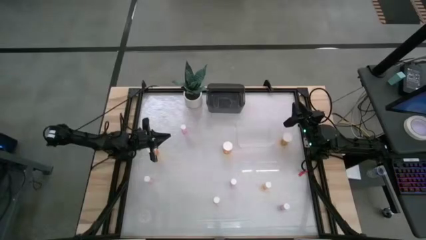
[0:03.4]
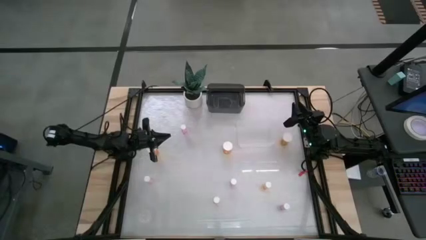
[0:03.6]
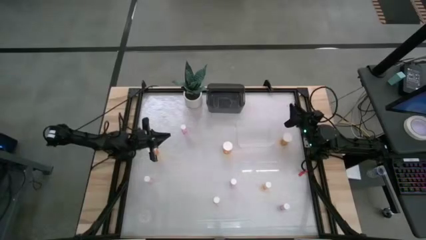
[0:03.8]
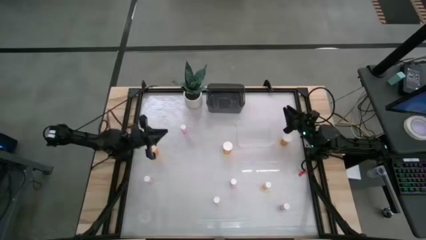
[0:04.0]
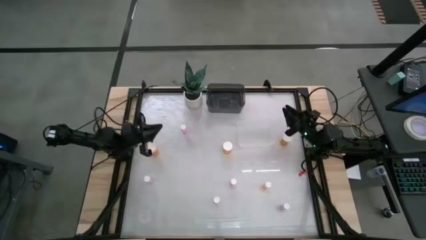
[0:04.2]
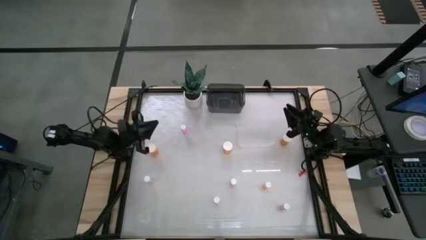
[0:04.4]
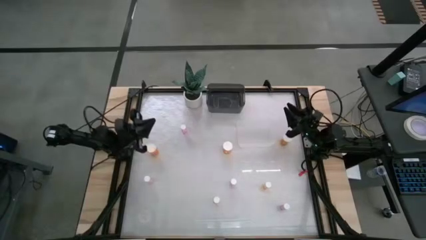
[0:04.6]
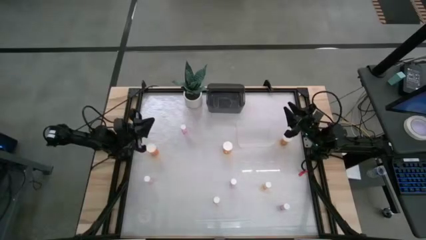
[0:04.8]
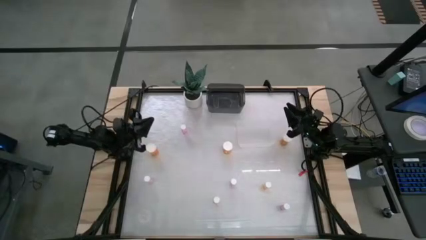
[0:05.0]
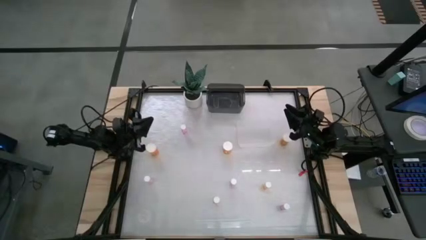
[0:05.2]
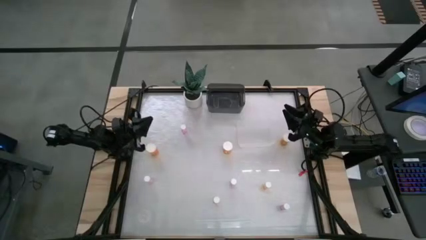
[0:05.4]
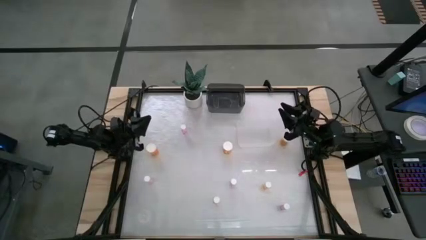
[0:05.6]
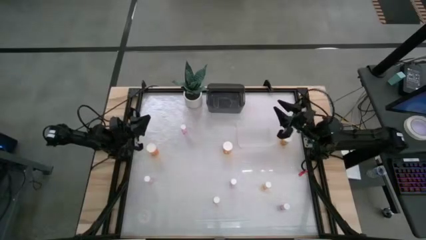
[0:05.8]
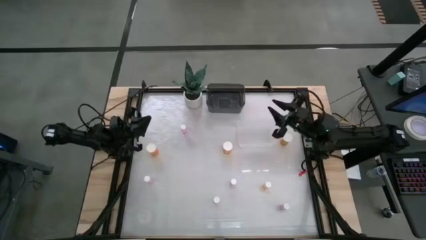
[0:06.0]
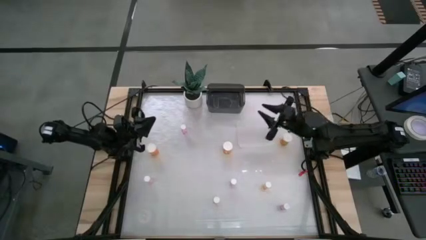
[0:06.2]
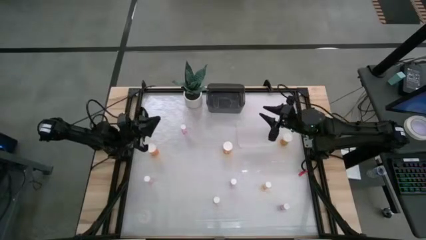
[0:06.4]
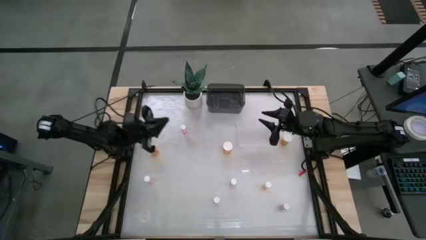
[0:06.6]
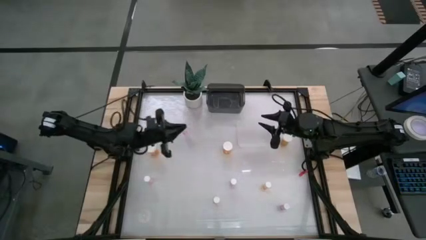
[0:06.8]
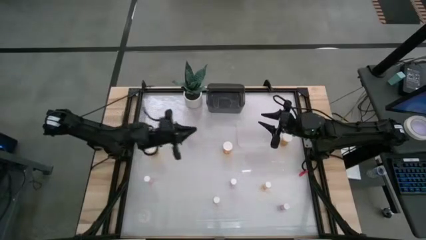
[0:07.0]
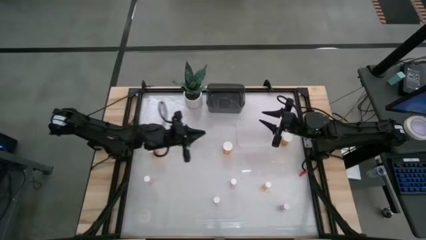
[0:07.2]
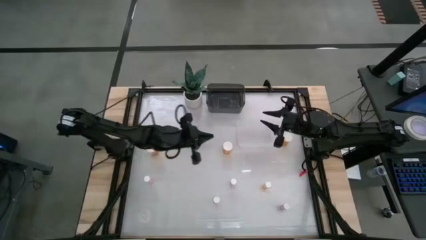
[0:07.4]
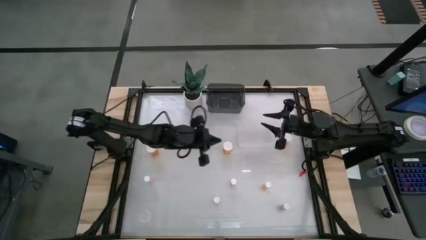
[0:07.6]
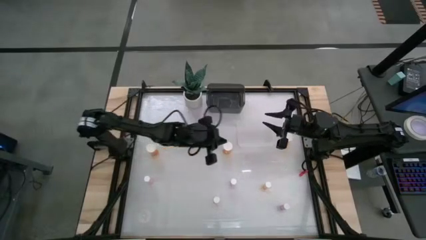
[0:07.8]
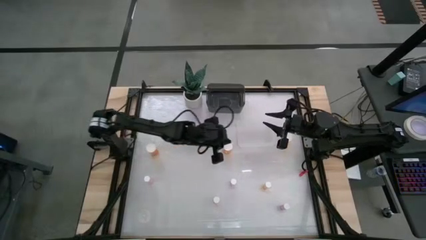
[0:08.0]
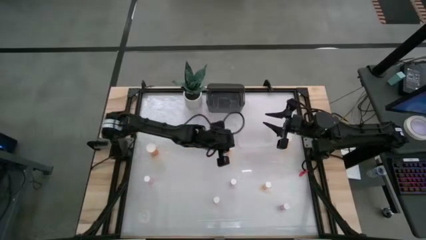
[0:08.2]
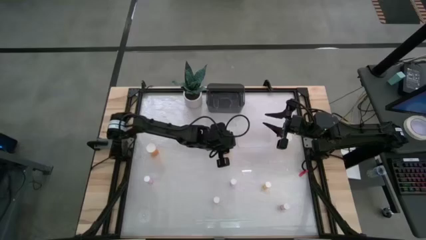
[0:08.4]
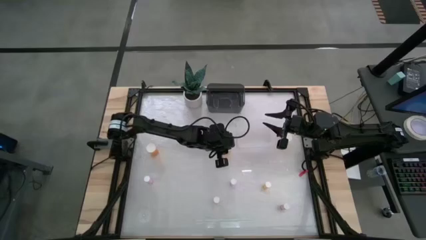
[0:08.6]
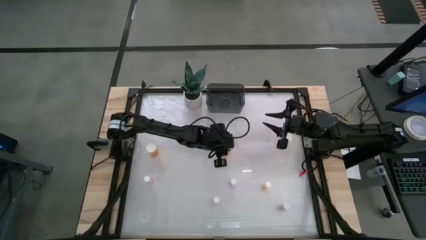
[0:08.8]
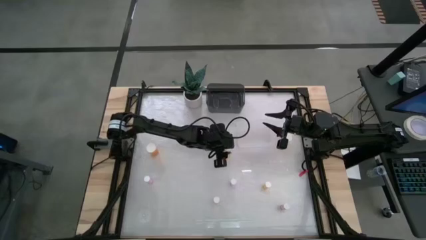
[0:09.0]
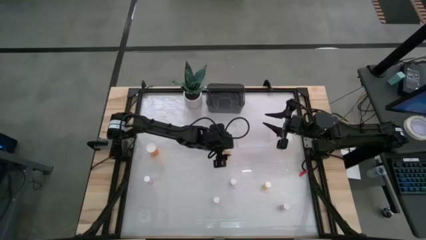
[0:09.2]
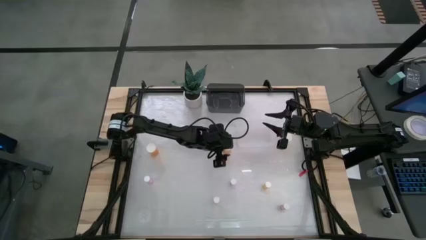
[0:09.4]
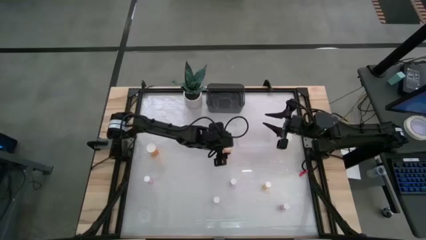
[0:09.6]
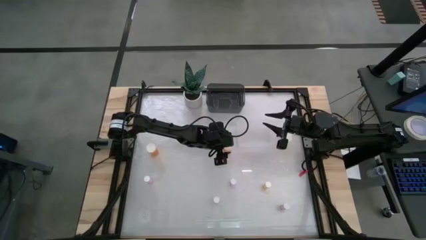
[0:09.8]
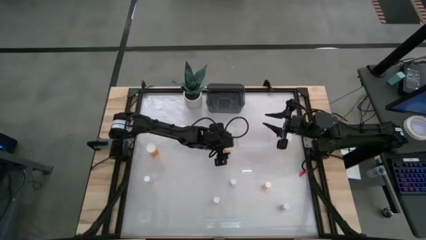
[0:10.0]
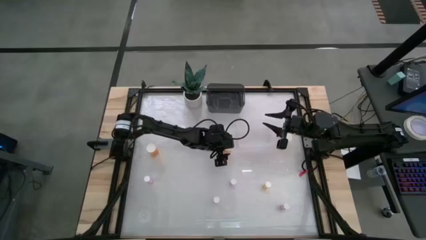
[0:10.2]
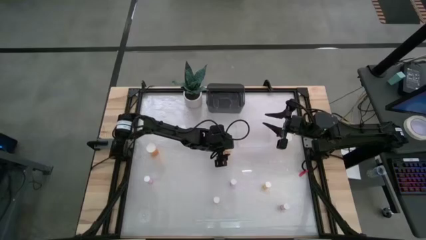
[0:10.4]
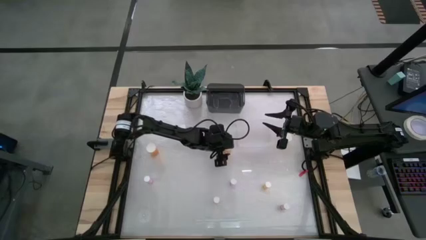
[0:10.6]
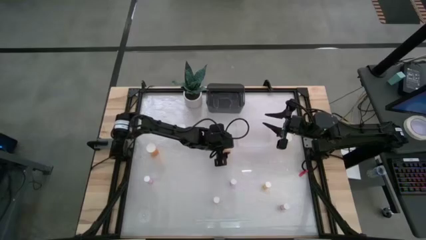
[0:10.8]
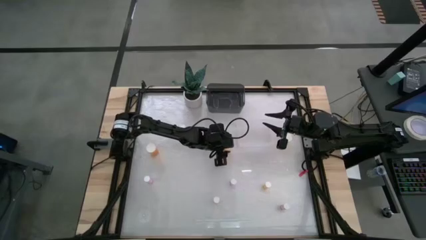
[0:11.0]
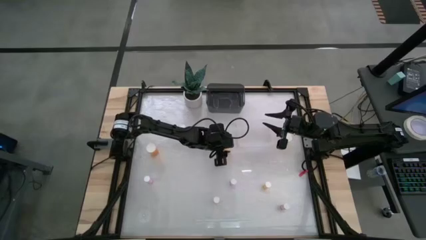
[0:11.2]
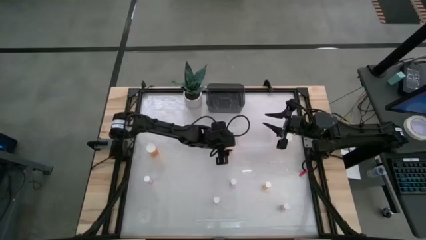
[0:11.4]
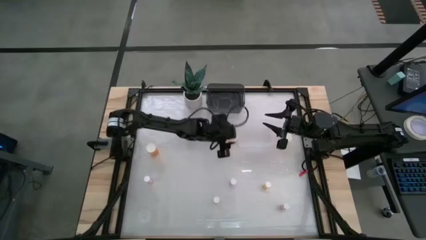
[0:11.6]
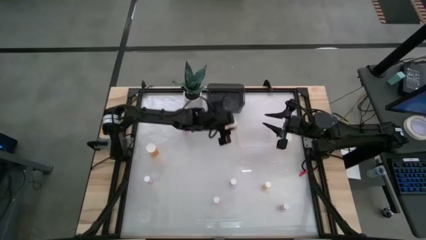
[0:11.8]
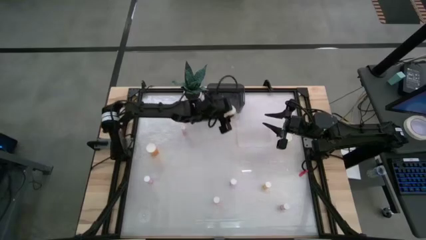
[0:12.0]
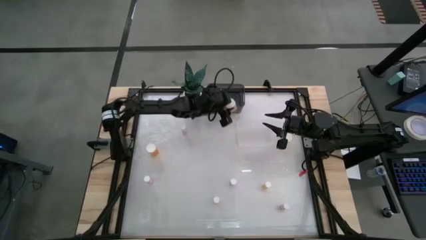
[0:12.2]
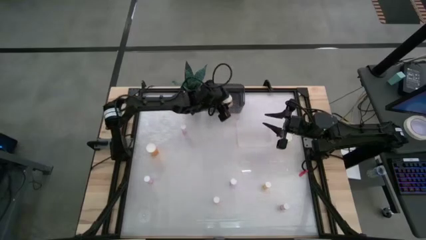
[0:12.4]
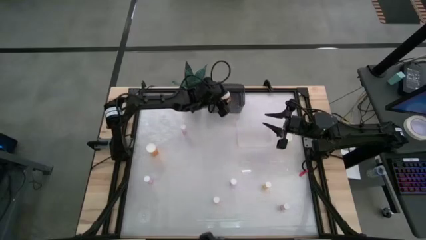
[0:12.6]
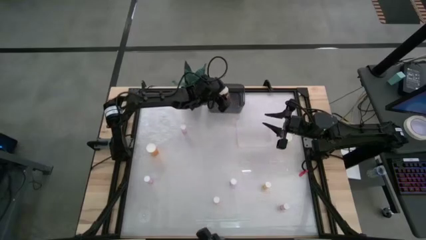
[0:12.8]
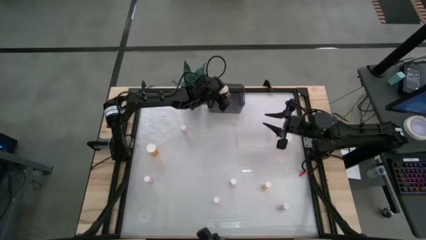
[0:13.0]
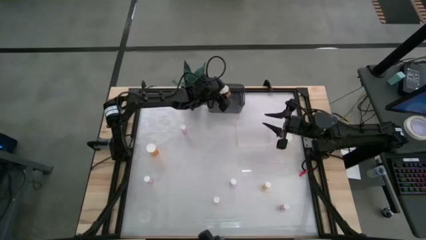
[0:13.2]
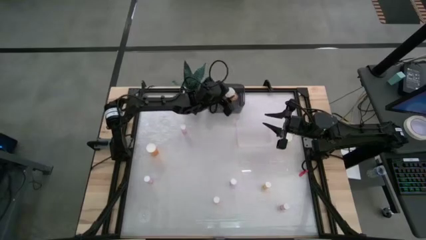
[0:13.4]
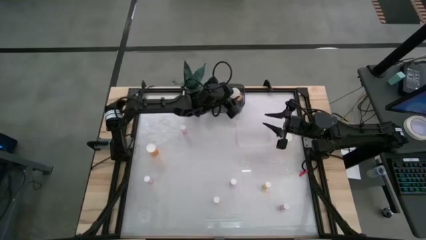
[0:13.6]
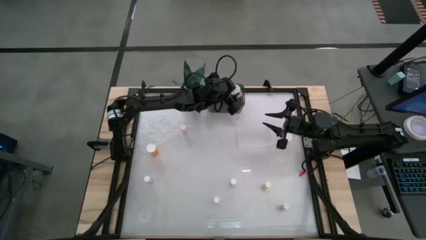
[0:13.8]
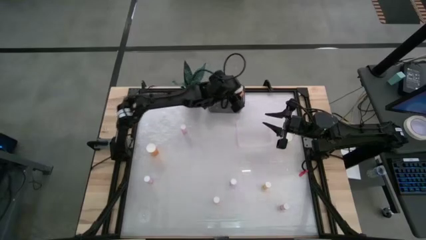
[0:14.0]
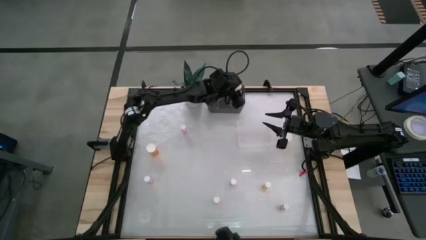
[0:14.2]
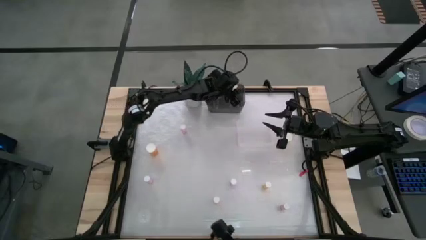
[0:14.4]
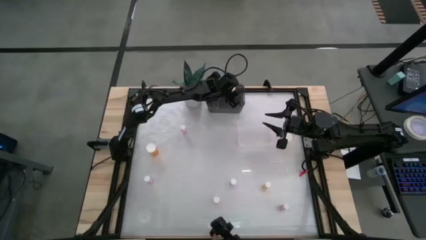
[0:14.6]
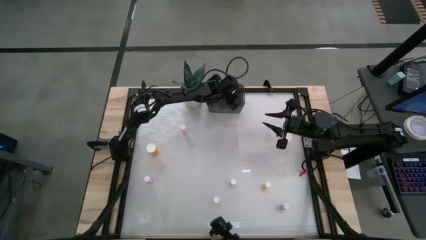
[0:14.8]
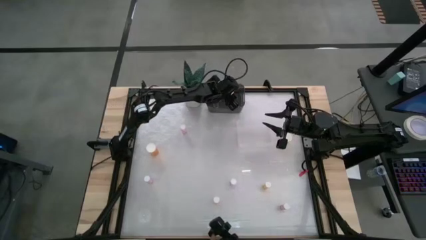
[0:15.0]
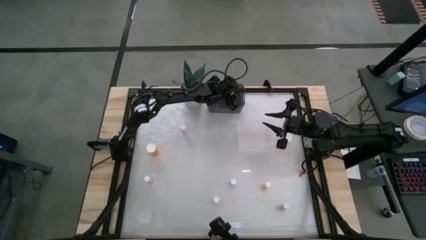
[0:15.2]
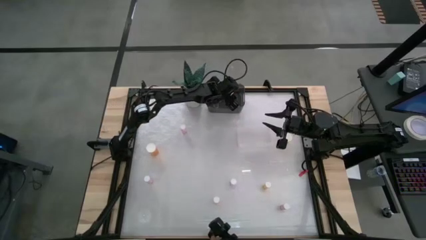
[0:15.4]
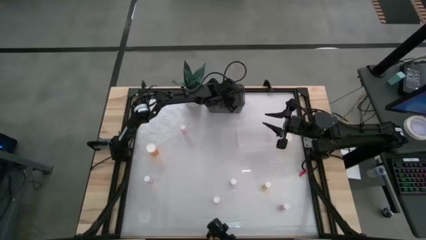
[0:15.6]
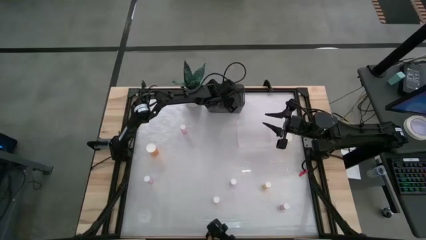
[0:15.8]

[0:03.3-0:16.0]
Task: Pick and place medicine bottles into bin by pill shape (circle, oval)
Put the large orange pill bottle into the black bin

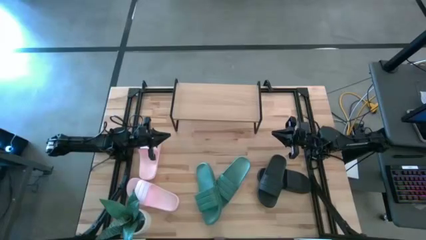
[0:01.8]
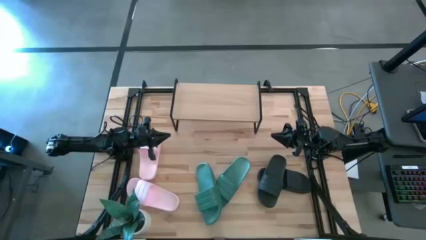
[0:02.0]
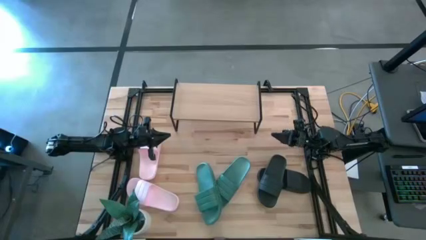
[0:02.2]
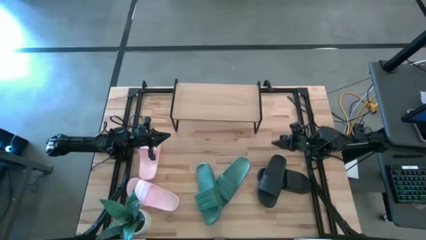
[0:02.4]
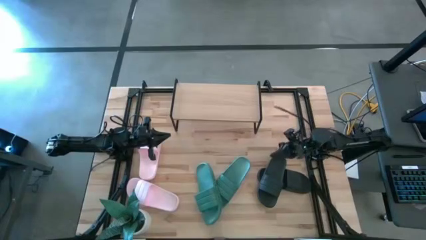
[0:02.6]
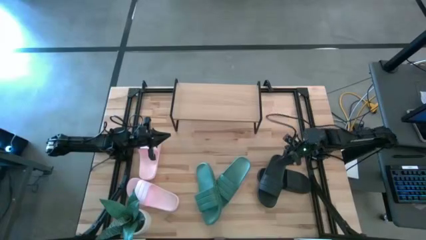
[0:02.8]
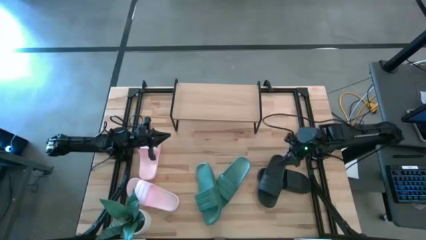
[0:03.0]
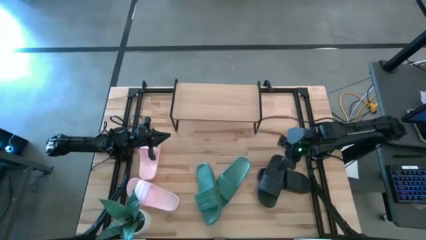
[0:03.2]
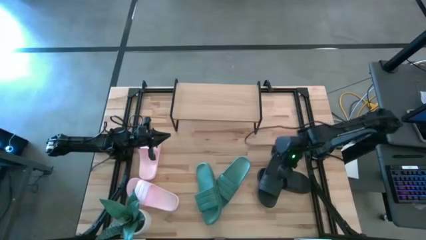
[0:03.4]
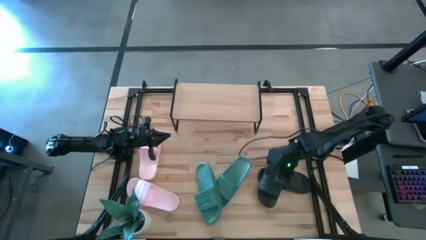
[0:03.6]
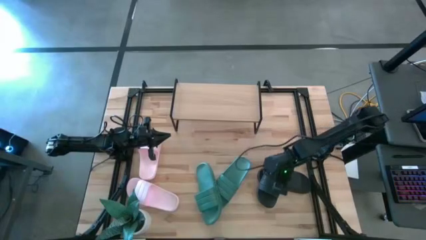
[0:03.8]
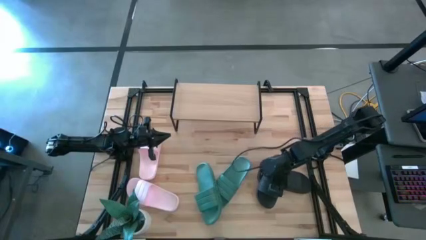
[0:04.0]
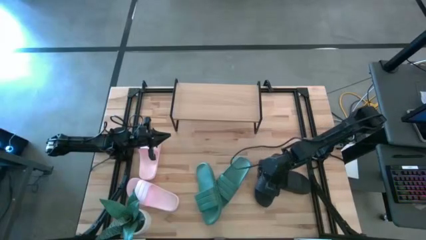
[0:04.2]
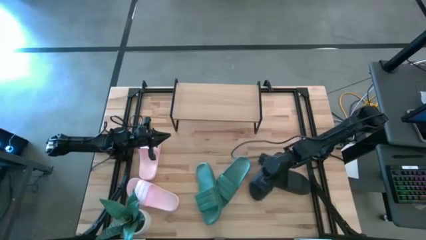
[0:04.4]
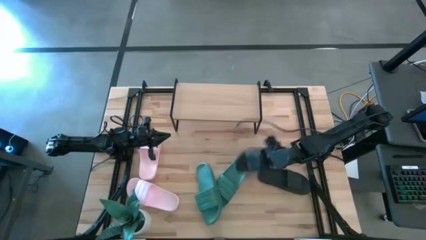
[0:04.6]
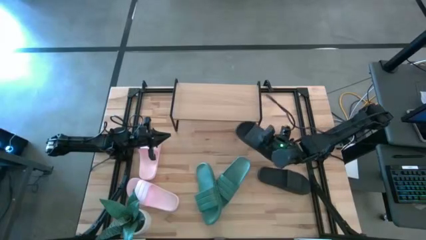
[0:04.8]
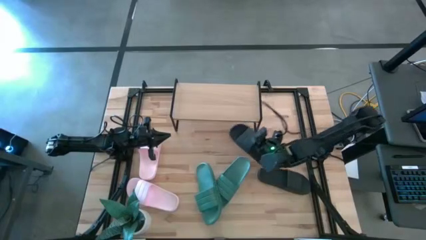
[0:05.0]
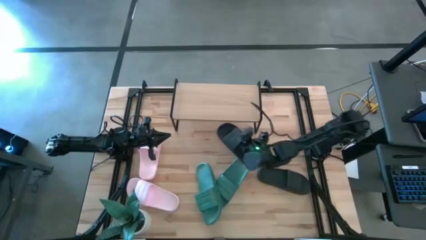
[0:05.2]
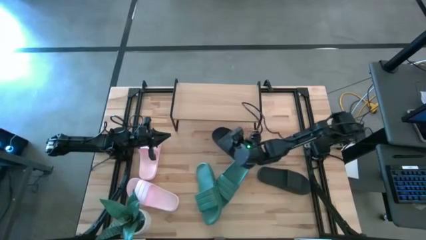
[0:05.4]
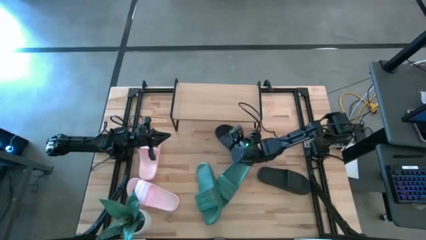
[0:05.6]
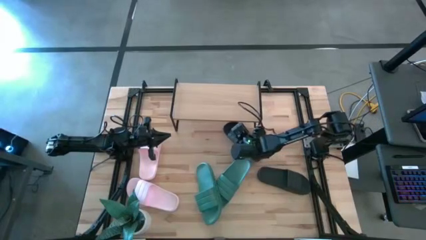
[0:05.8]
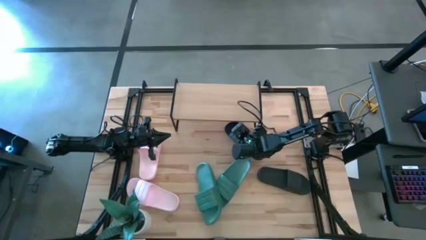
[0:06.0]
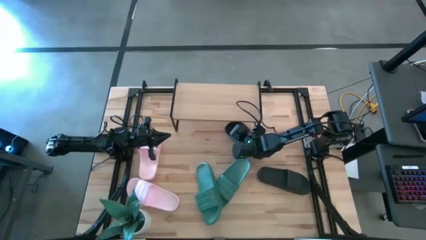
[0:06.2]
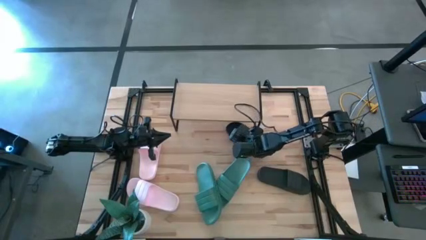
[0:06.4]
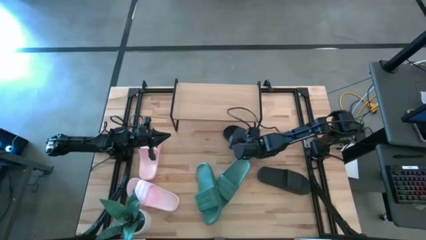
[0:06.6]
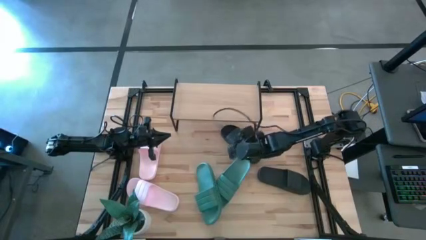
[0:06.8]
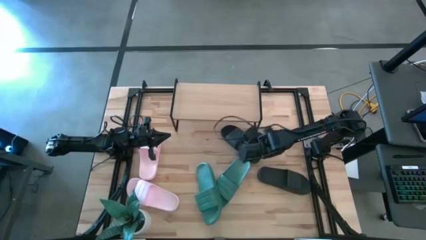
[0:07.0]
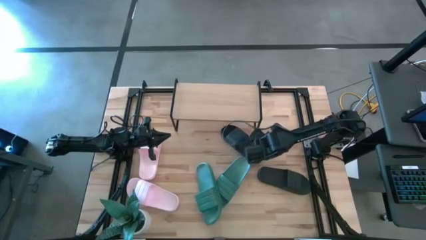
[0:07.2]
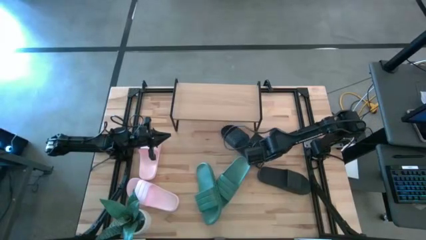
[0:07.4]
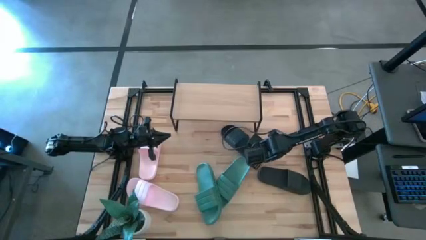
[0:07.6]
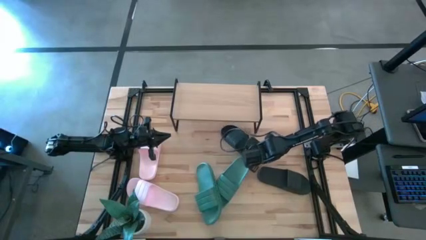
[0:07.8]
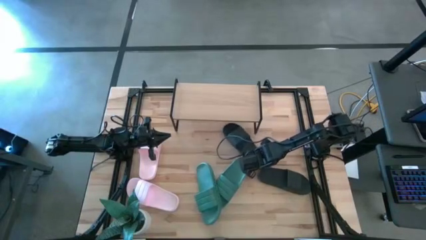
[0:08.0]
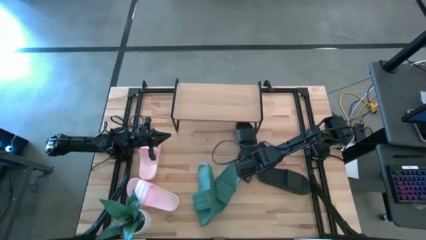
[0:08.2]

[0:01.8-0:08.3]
Task: Pick and place slides into the shelf
Put the top black slides under the shelf
